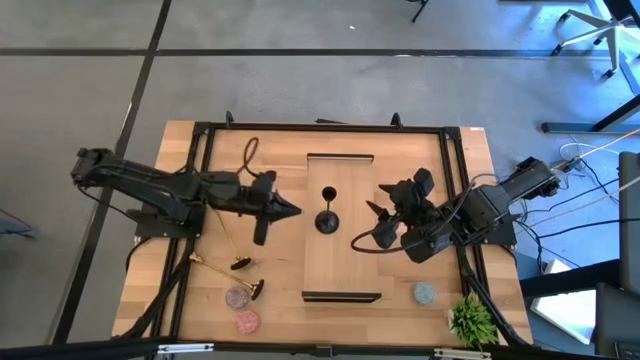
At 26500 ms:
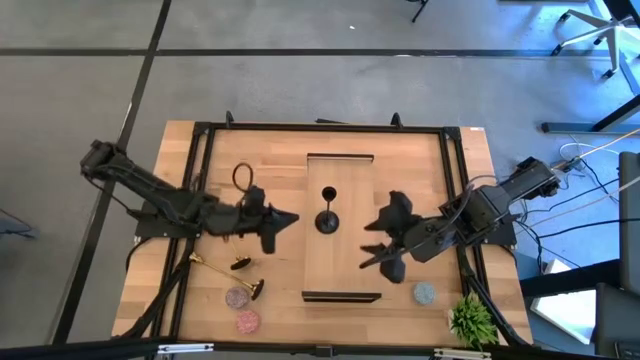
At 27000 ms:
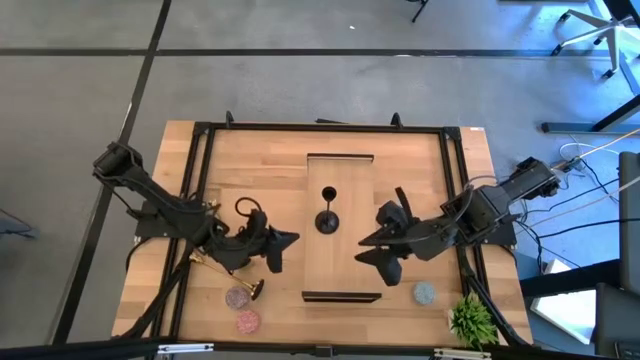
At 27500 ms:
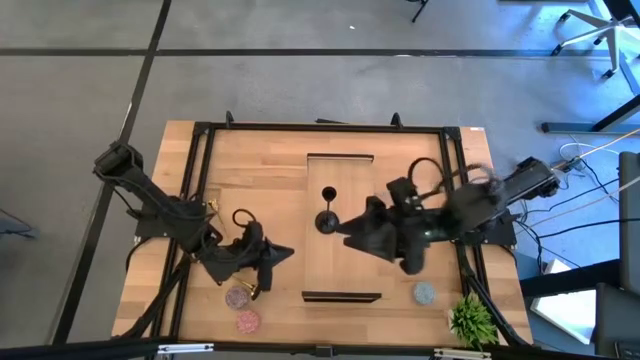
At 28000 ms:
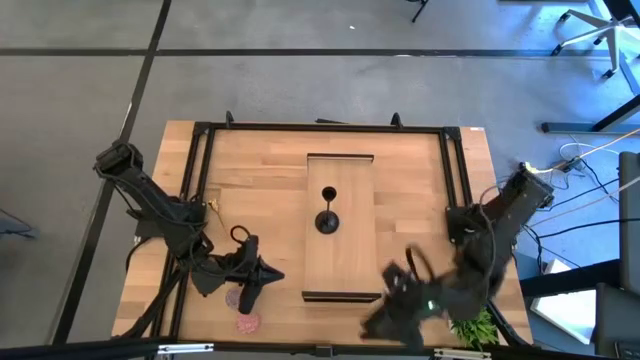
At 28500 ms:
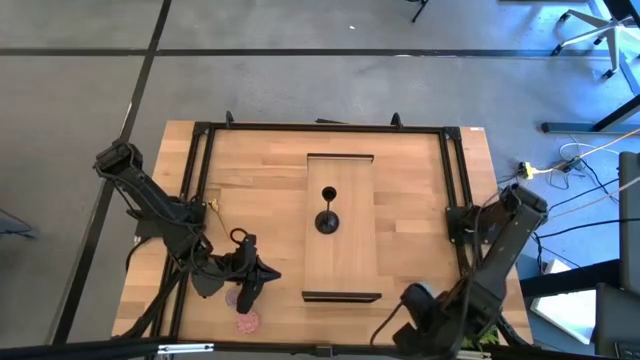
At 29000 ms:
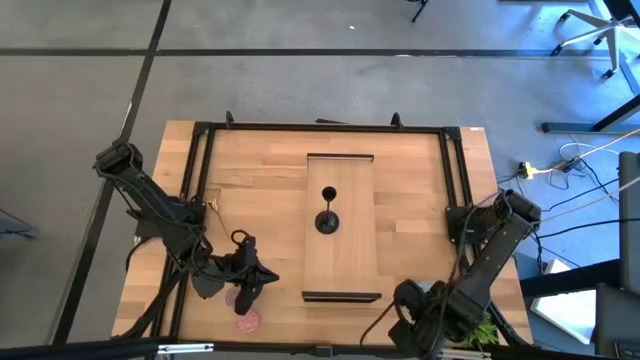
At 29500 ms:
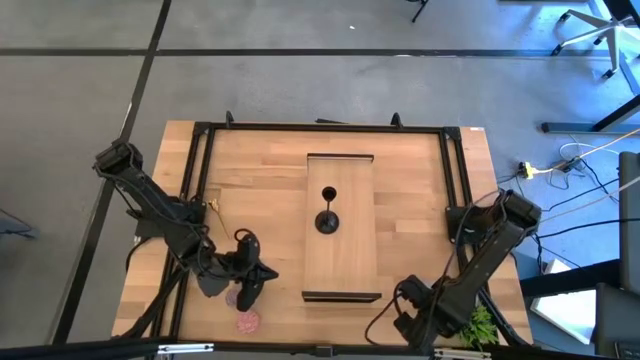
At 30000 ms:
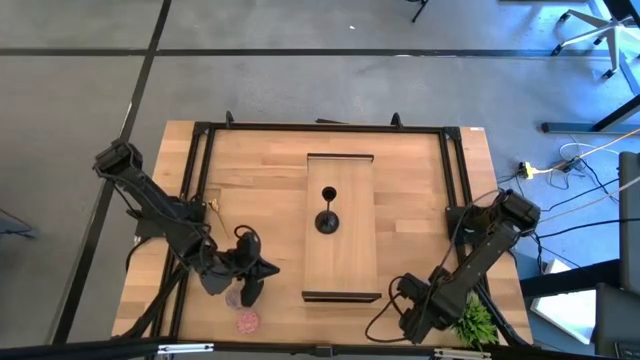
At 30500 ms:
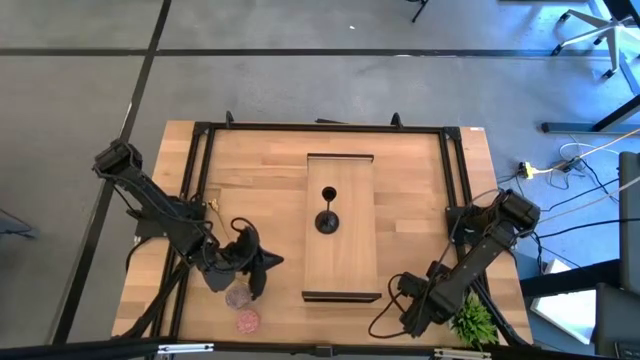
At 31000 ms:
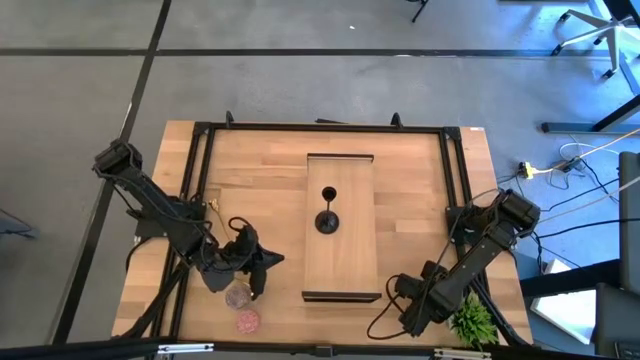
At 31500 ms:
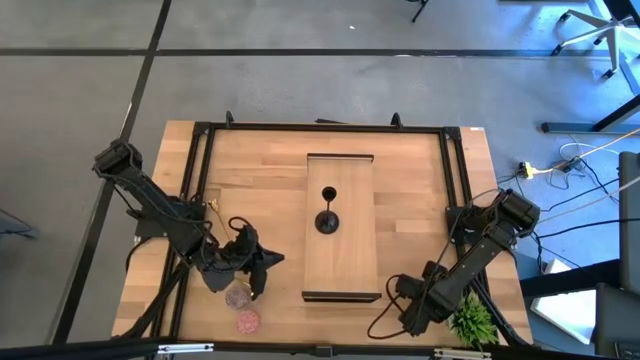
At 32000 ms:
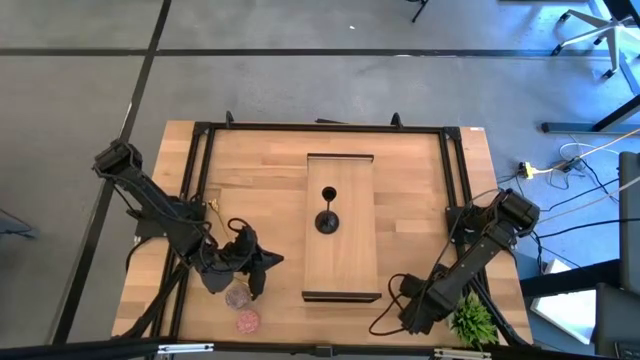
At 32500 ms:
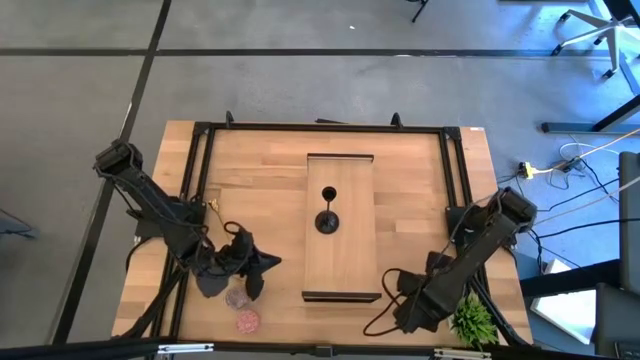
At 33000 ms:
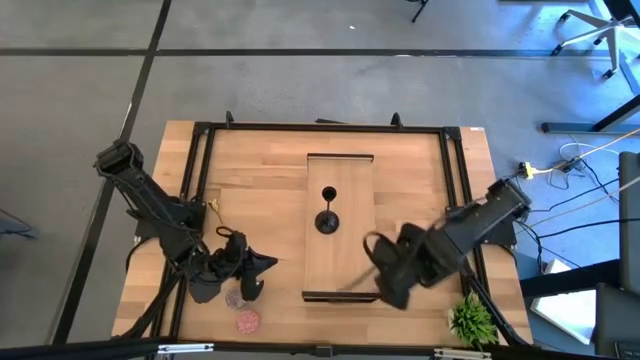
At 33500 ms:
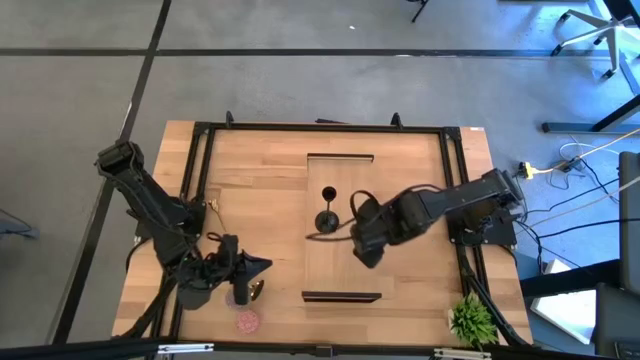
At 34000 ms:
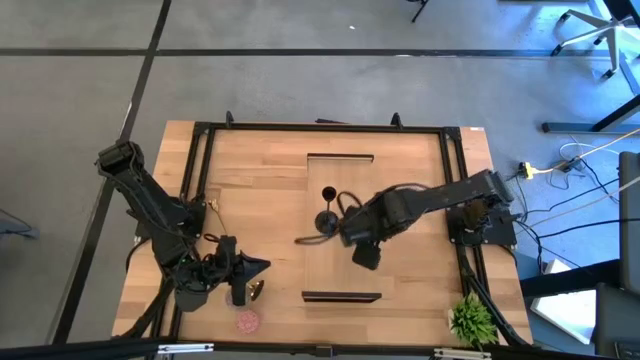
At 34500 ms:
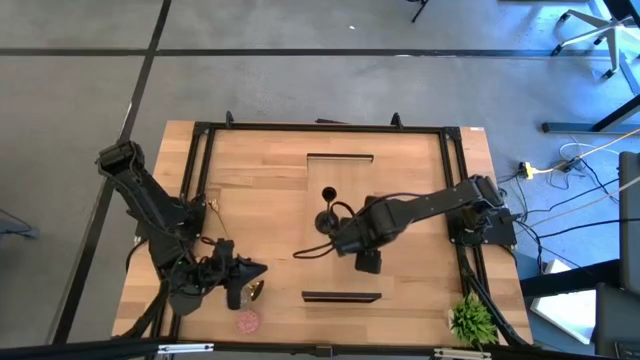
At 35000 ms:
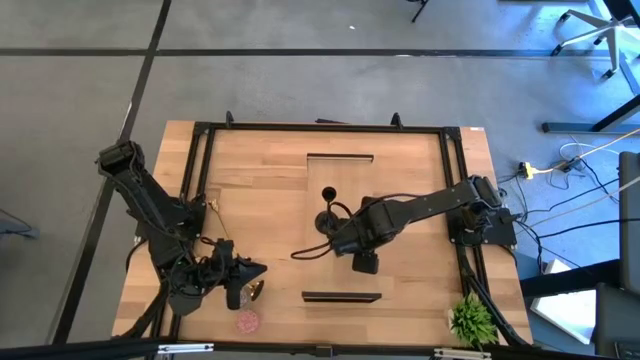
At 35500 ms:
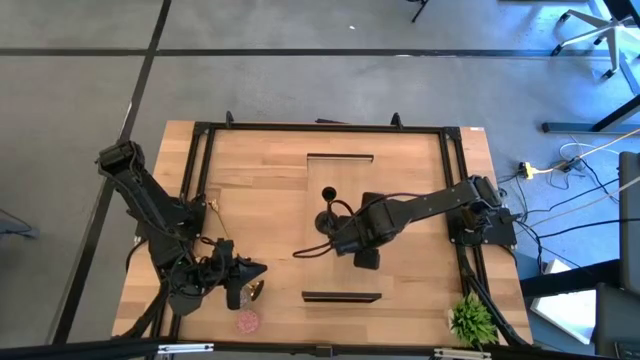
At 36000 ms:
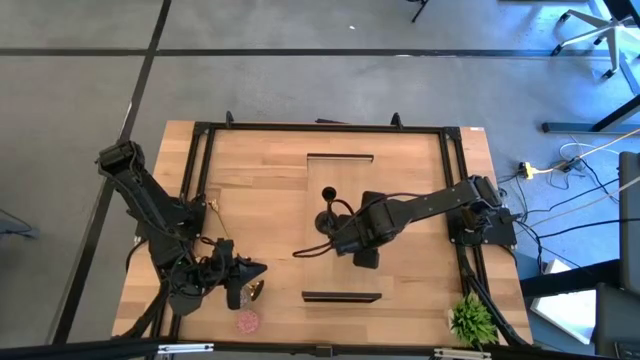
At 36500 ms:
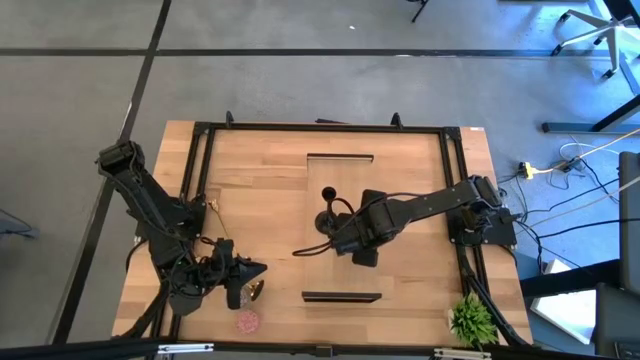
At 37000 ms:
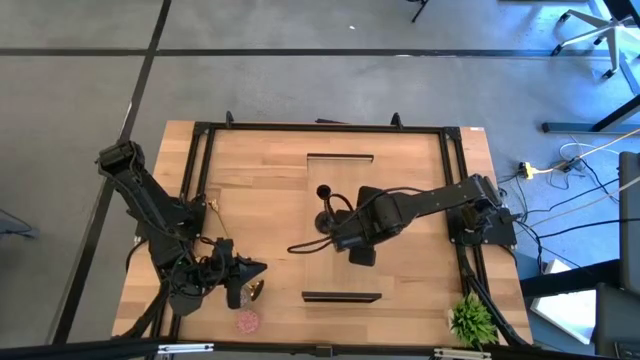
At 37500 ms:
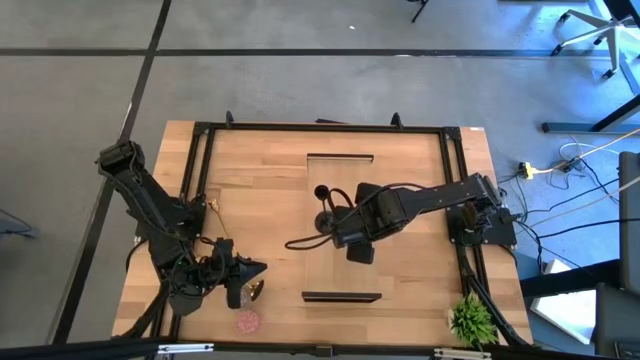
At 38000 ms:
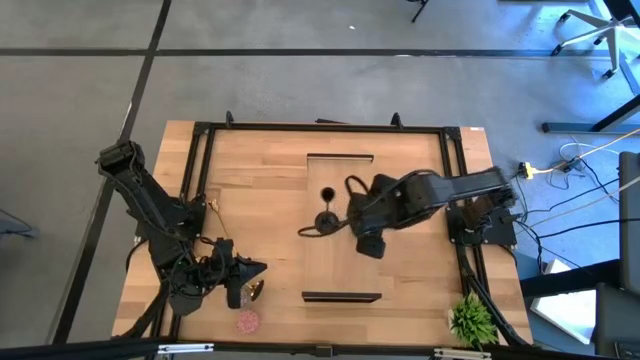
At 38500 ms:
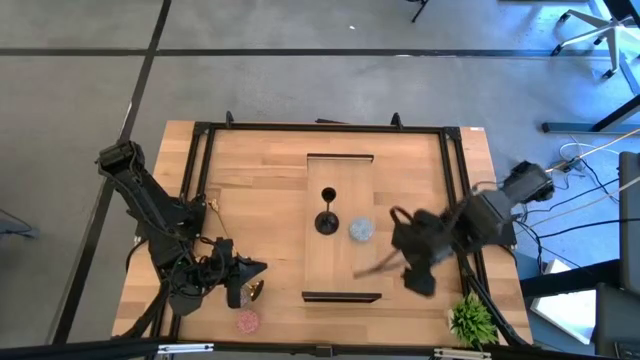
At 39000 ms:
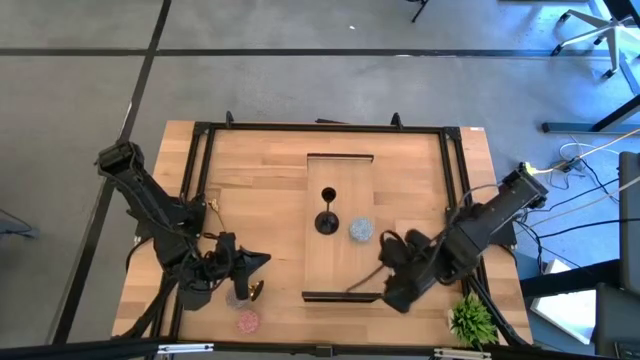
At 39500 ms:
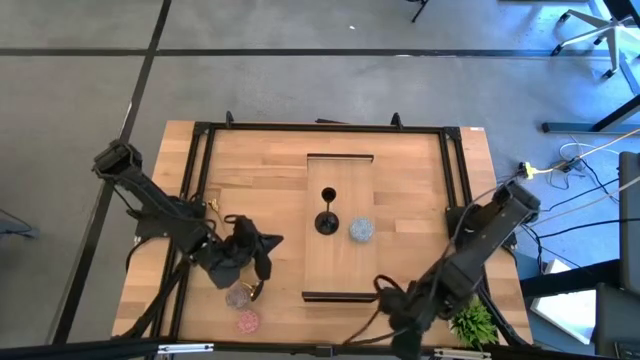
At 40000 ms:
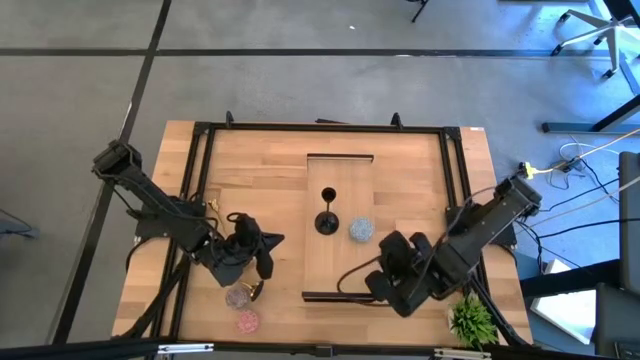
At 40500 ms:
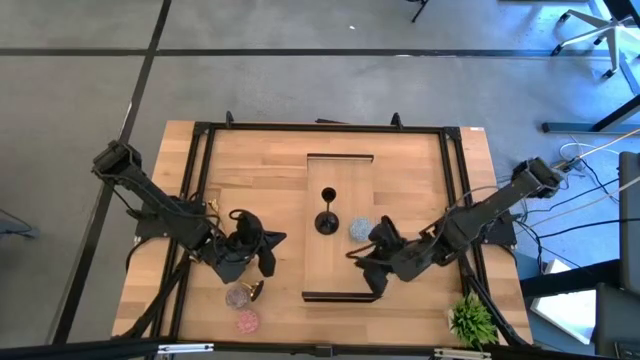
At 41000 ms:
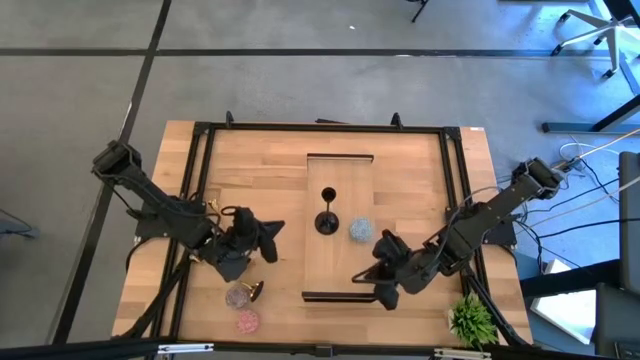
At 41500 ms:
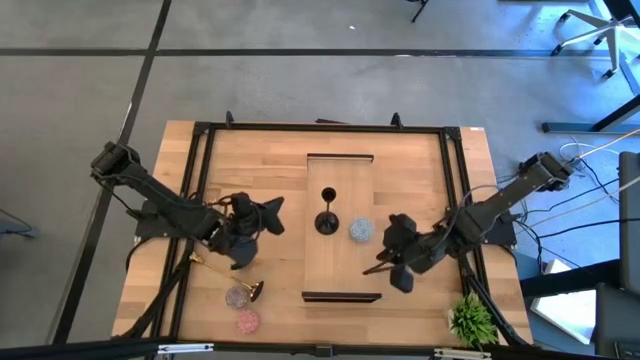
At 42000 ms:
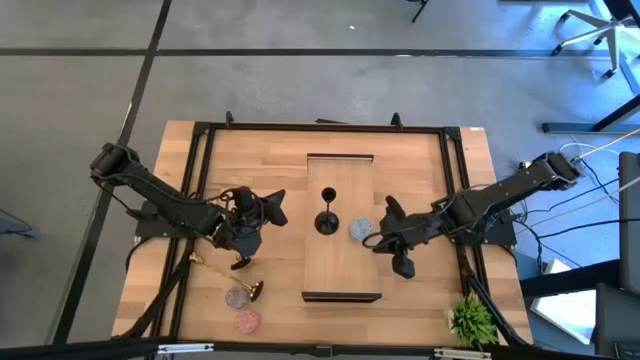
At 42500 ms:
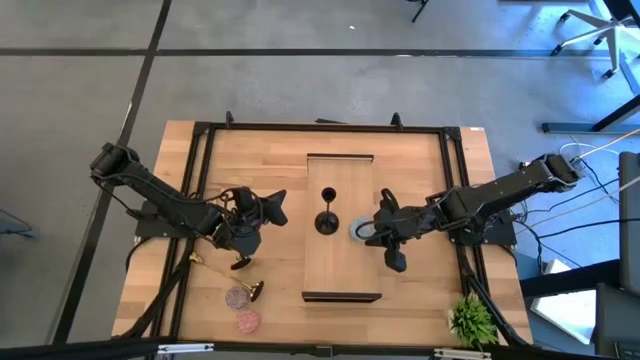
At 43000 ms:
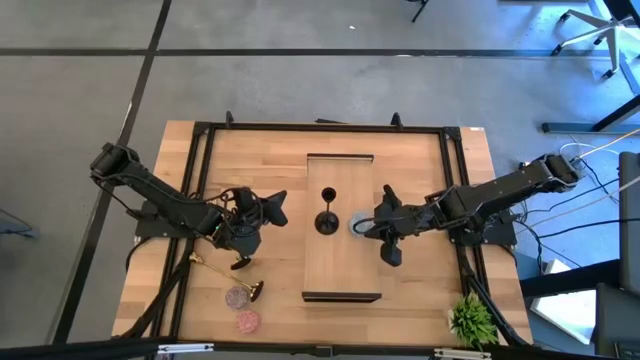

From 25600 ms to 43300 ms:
Task: Pick & Place candle stick holders
Put the light blue scented candle on the shelf

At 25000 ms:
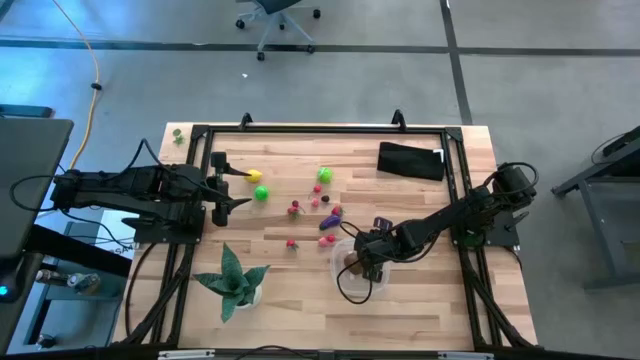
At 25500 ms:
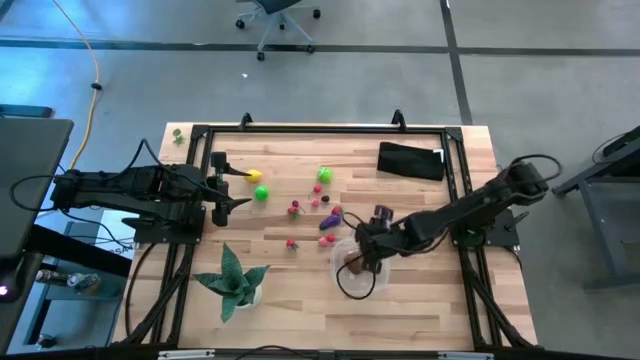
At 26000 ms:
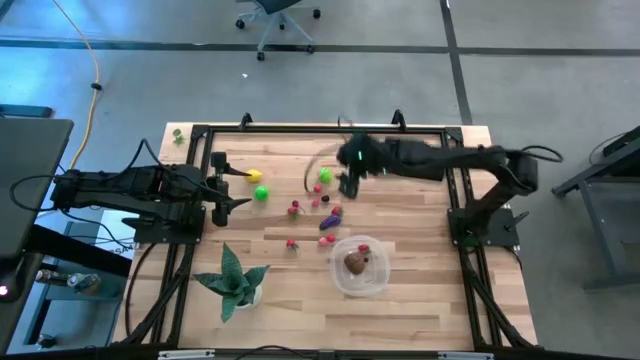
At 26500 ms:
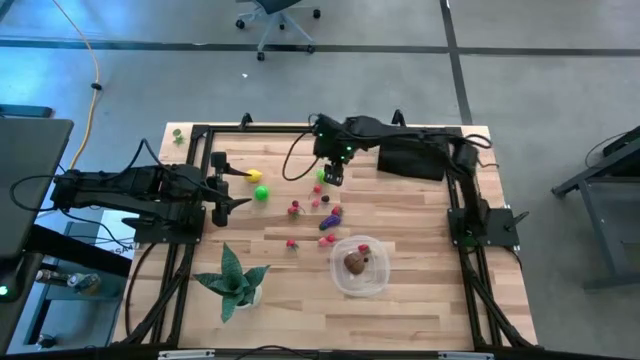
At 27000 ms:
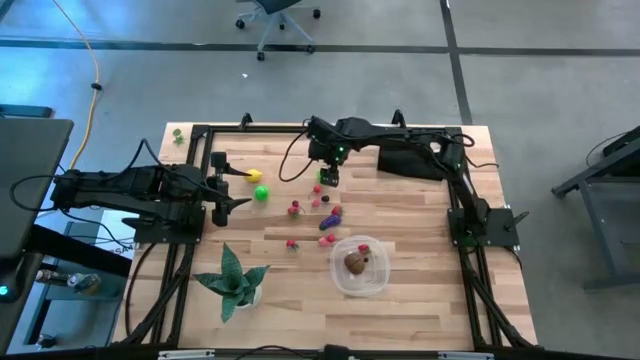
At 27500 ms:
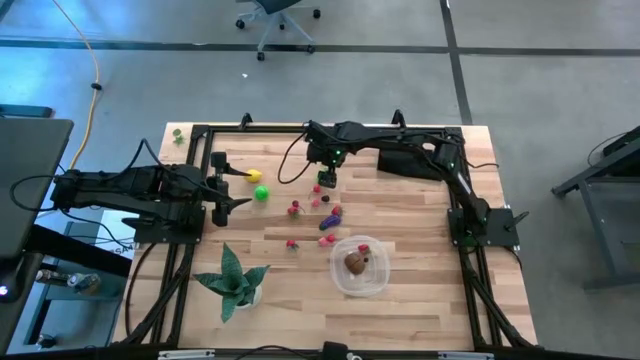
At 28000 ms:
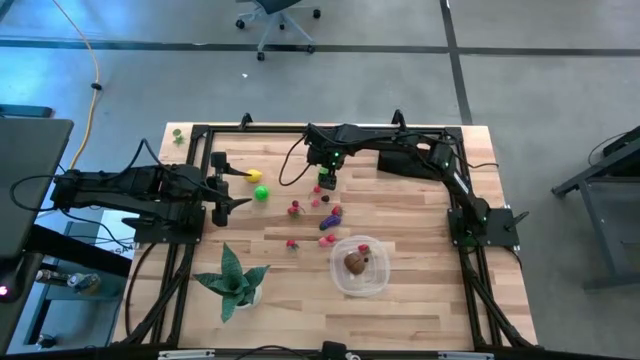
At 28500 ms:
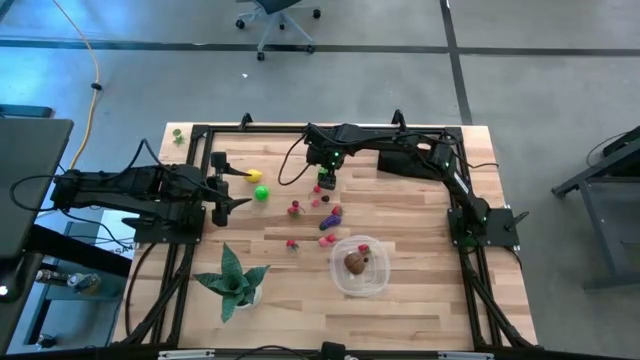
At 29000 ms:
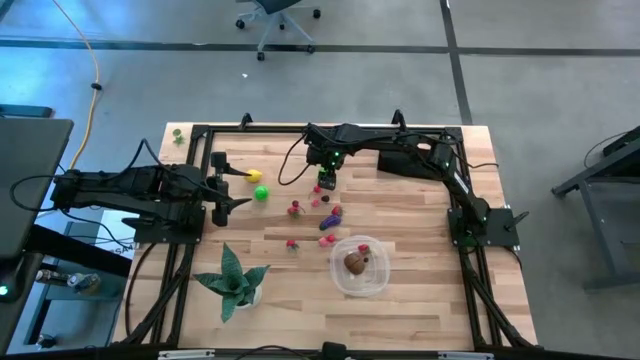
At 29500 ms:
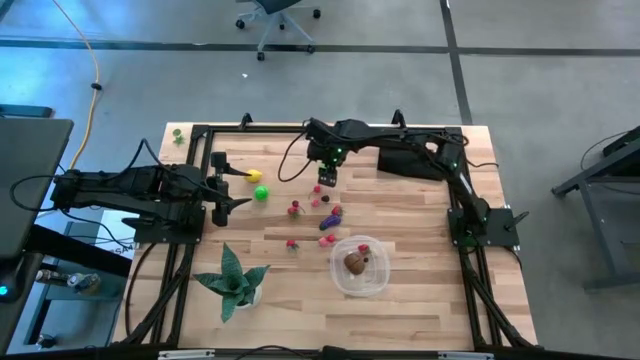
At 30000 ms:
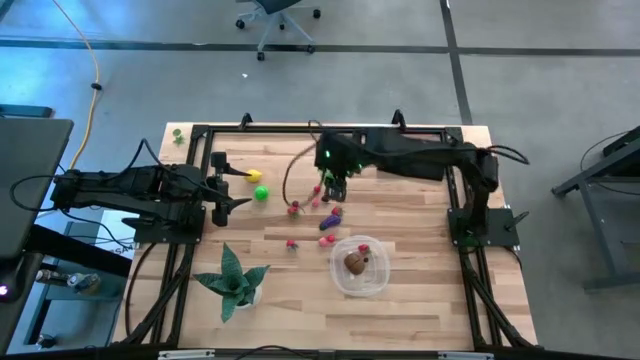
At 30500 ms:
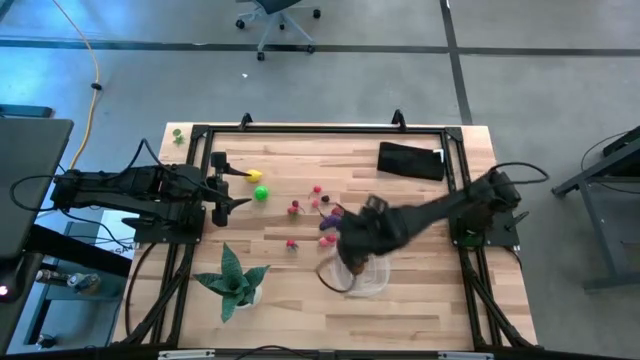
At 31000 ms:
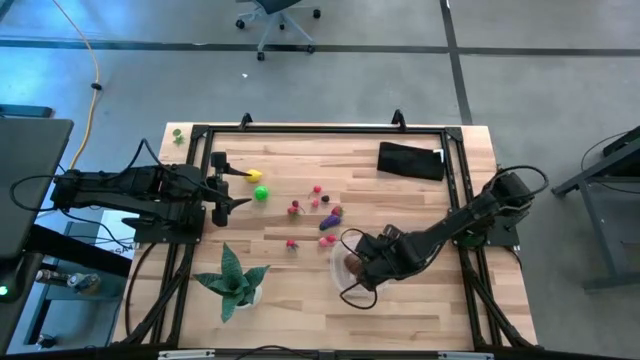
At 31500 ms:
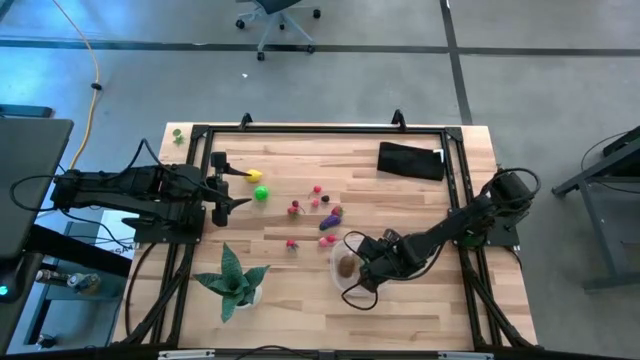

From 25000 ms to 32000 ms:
Task: Pick and placing Produce into tupperware
Put the cabbage into the transparent bin
